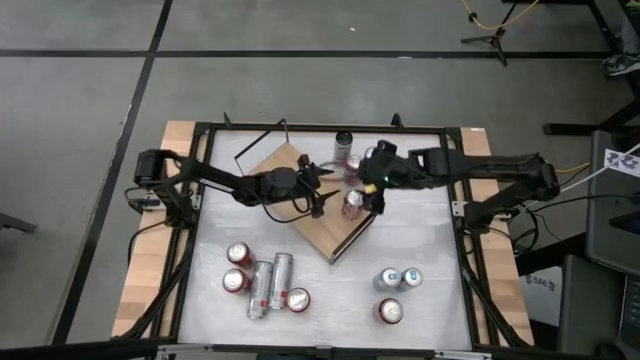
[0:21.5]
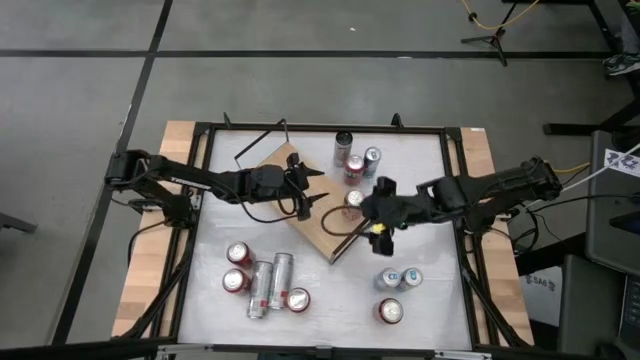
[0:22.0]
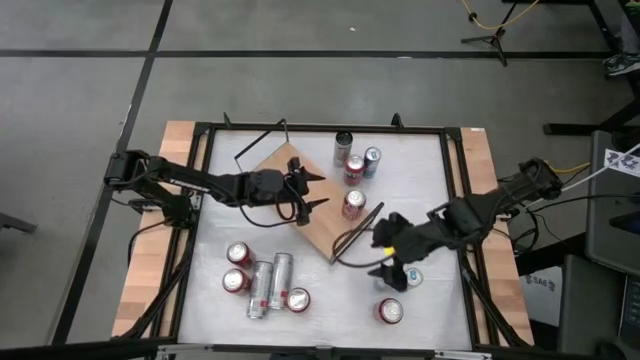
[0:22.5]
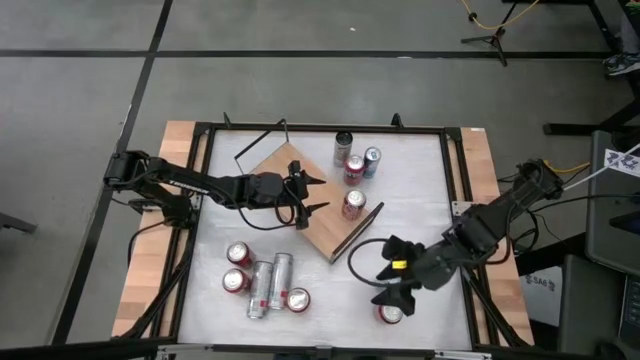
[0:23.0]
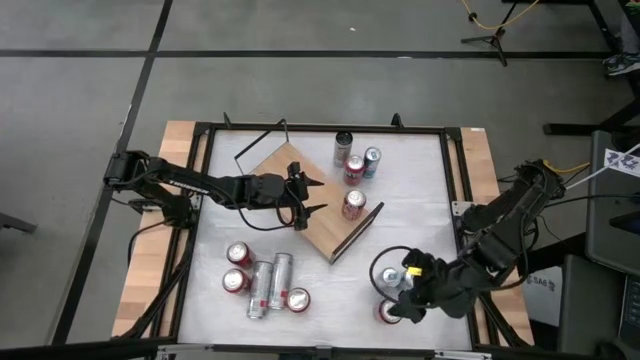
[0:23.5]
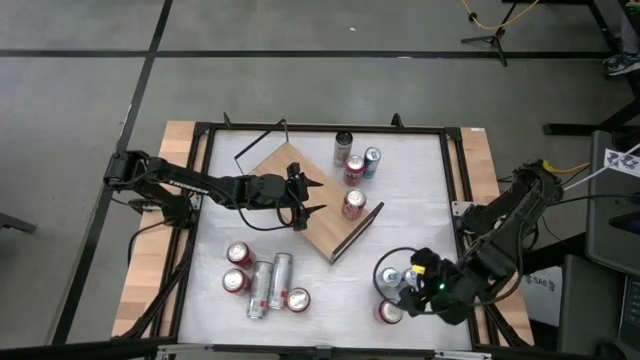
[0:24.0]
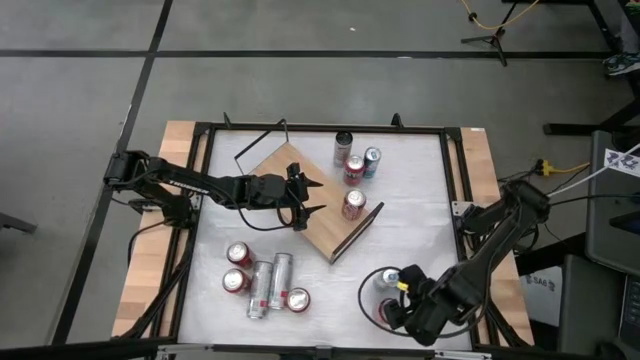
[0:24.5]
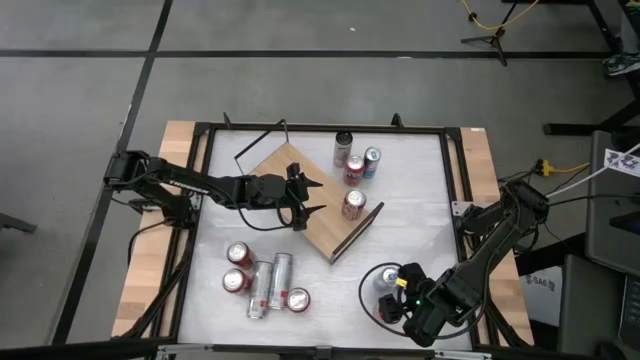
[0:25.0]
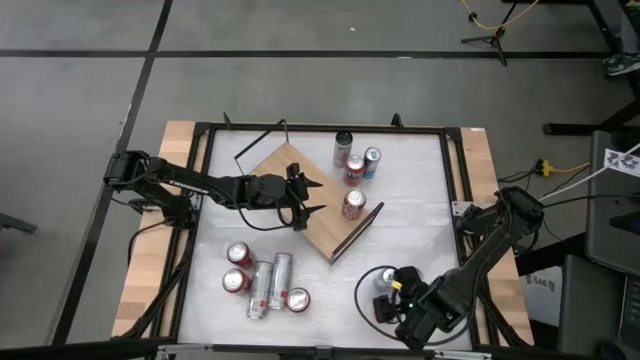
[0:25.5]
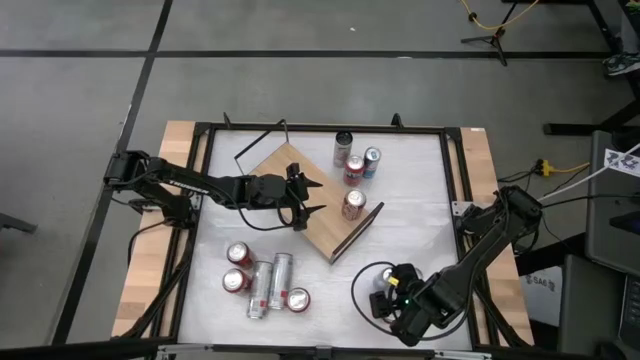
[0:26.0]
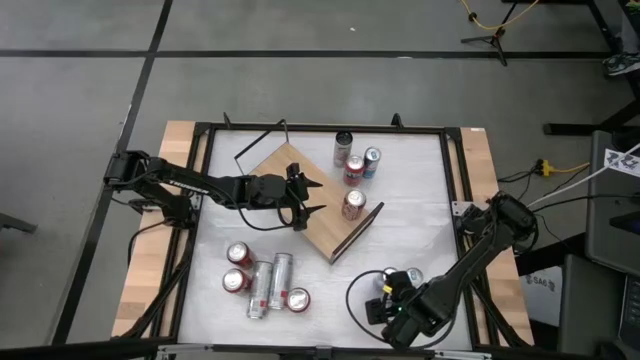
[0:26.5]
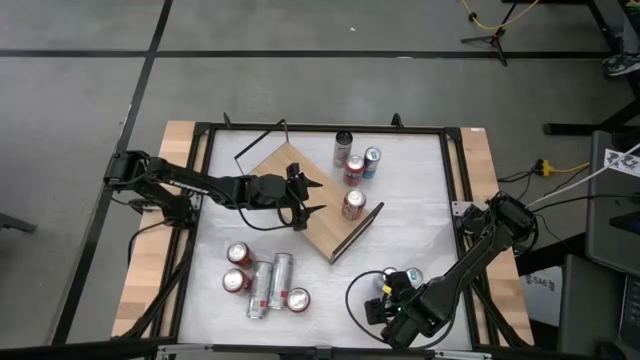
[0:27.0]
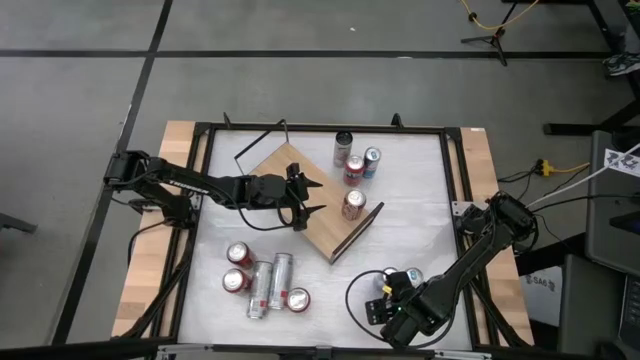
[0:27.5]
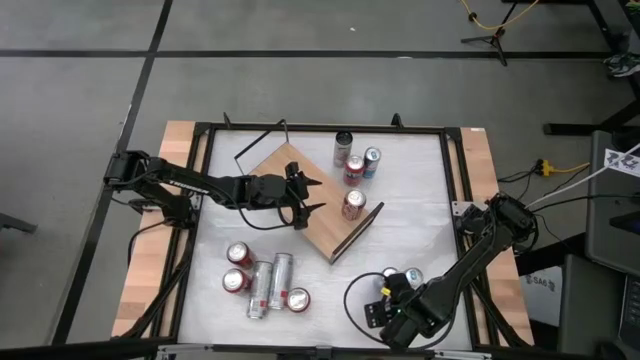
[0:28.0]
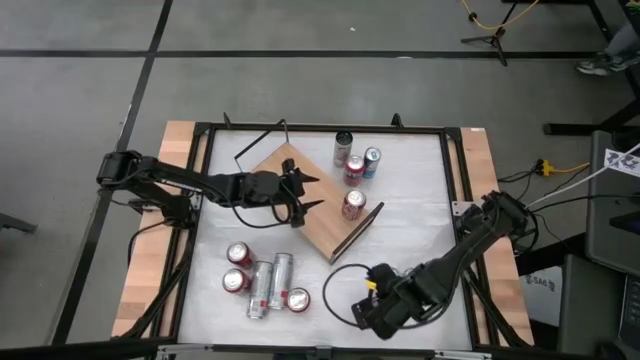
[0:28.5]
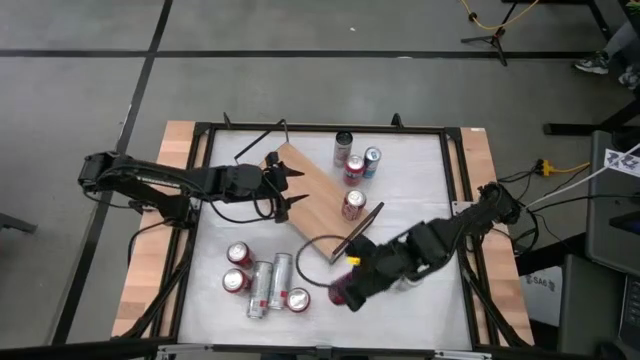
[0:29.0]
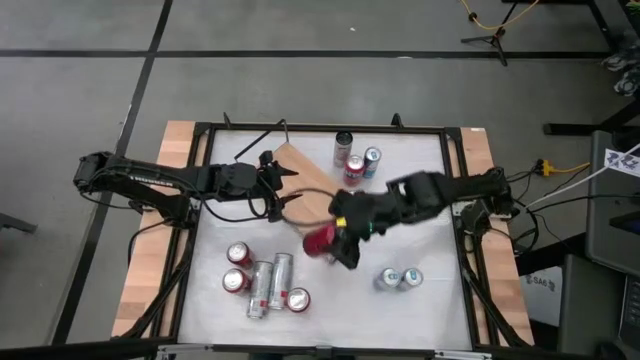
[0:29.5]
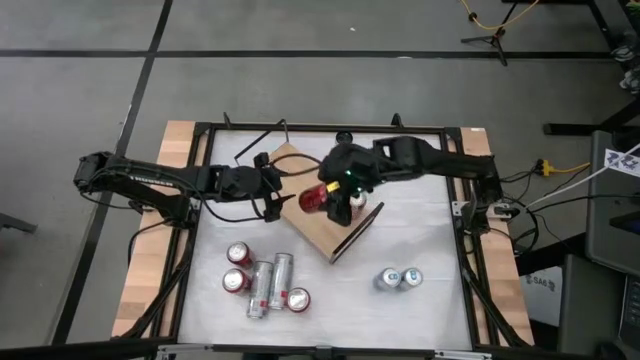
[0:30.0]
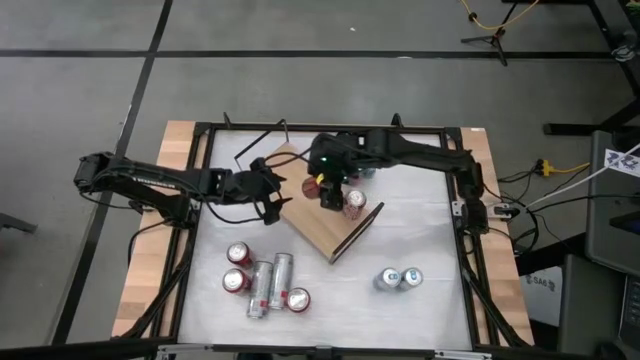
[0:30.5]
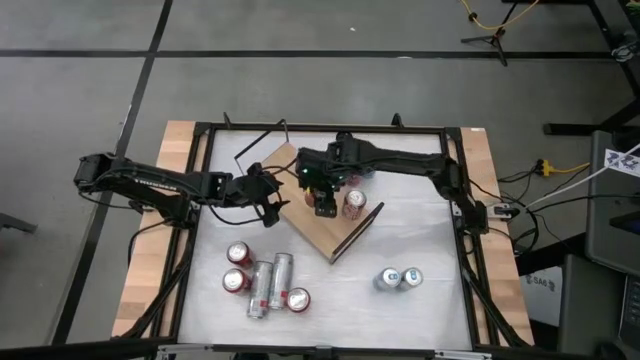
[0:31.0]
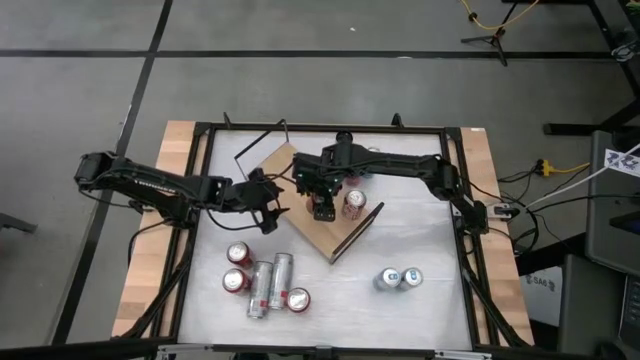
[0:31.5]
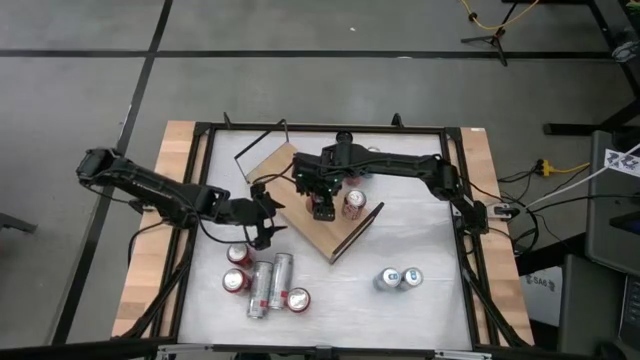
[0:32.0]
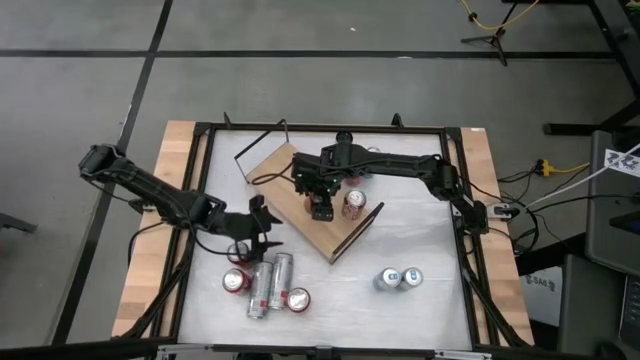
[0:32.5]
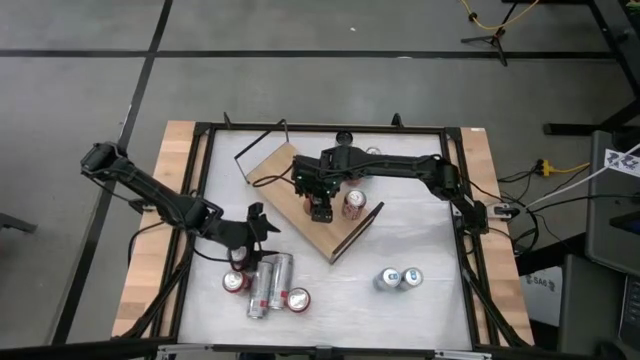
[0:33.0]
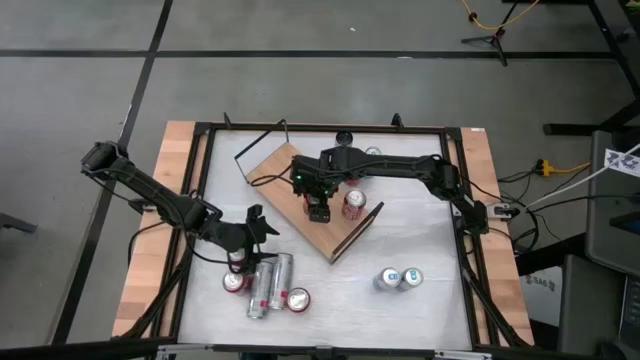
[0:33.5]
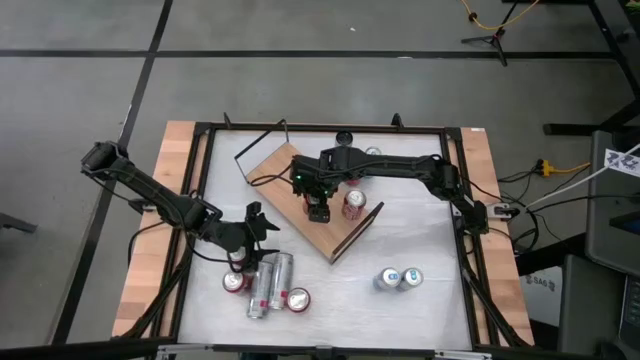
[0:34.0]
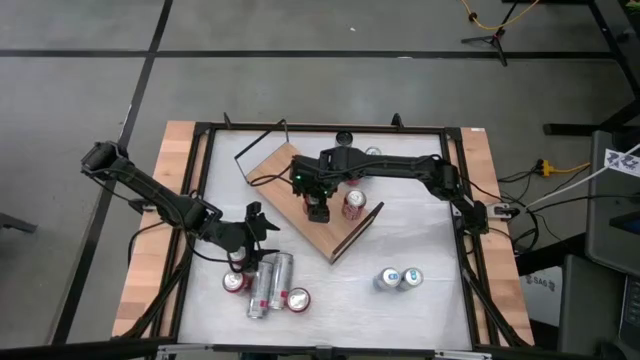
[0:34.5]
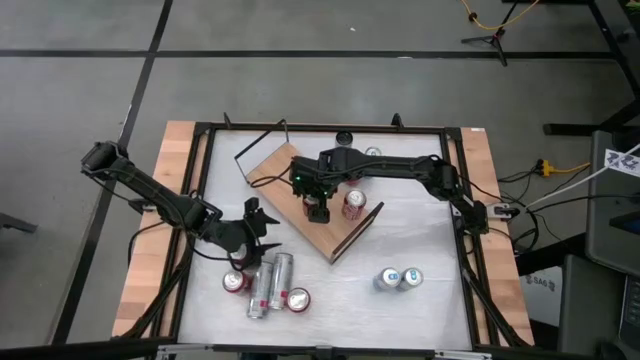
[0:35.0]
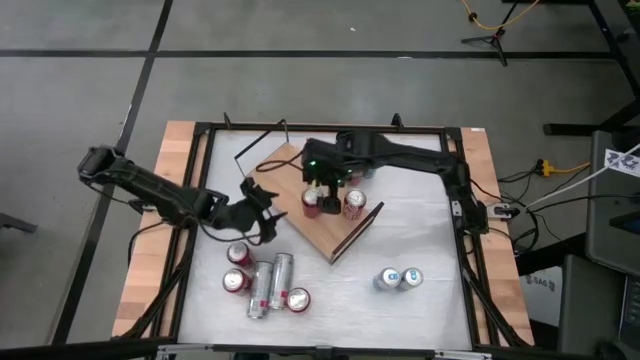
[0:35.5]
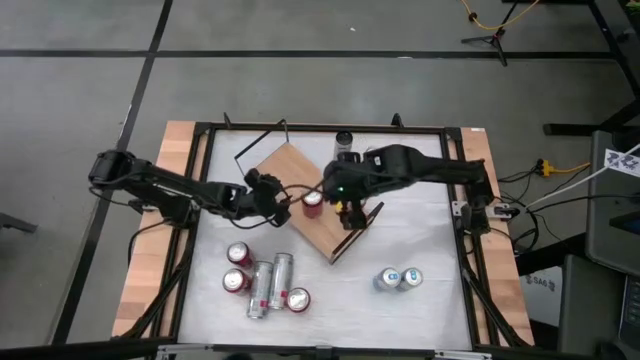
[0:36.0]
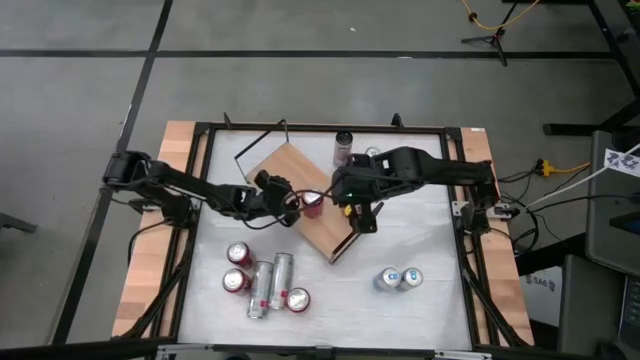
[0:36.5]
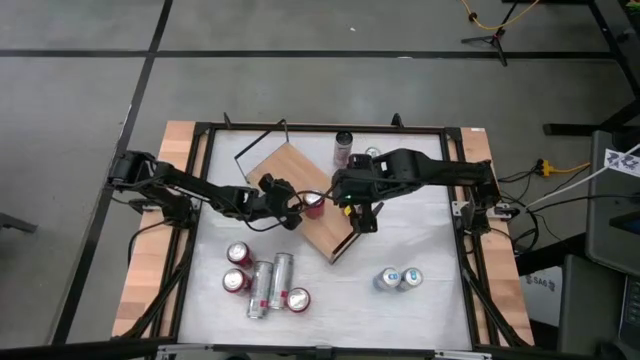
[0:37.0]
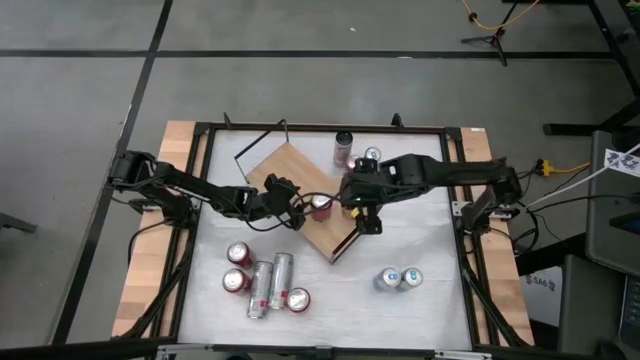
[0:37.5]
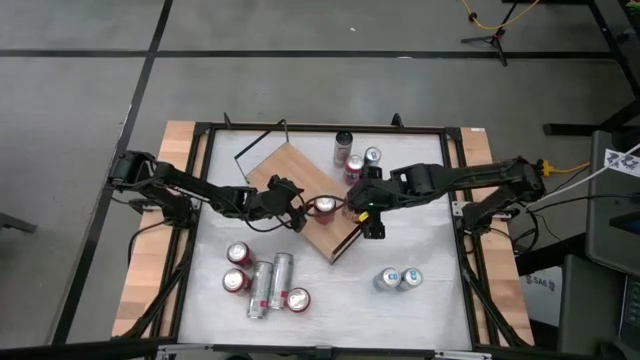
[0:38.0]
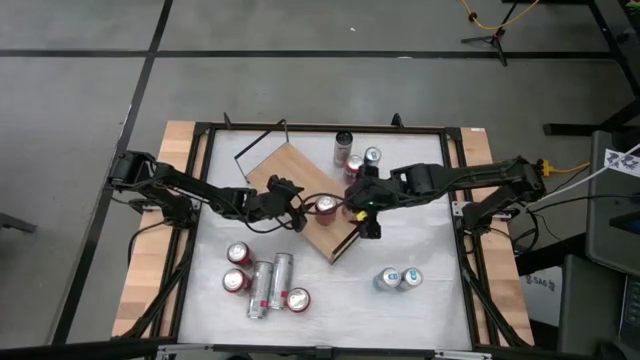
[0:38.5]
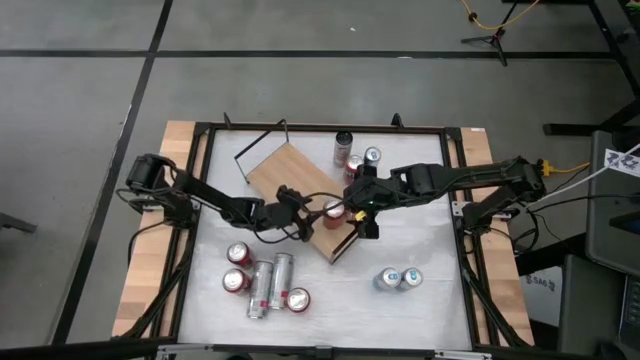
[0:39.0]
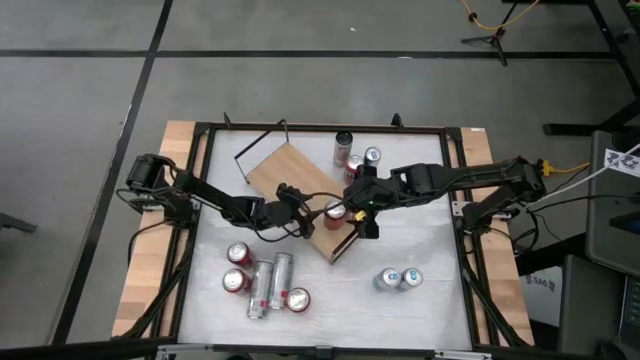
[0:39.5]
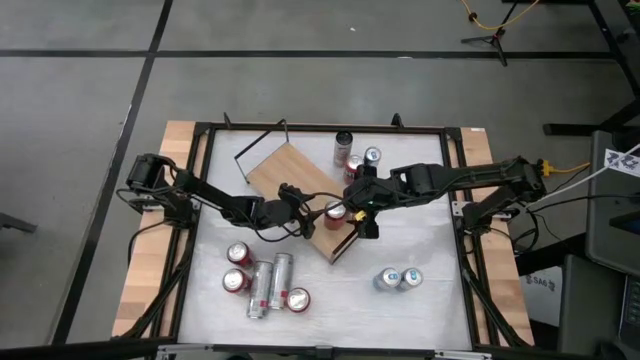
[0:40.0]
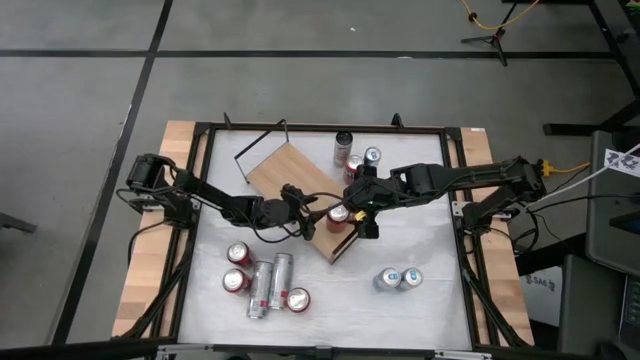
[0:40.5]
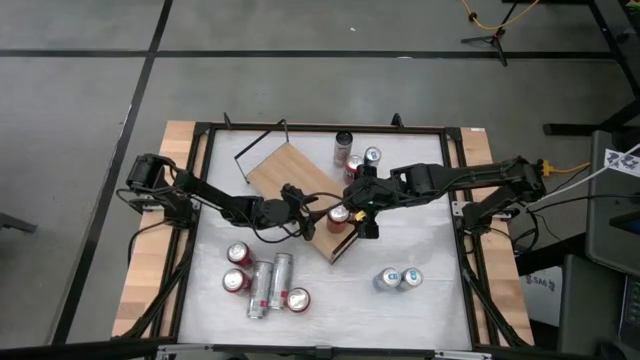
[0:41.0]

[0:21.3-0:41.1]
Task: Place canned beverage on shelf
Put the right red black soda can on the shelf aligned with the red white soda can
